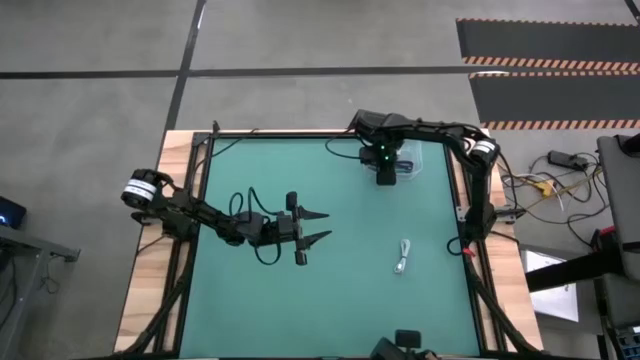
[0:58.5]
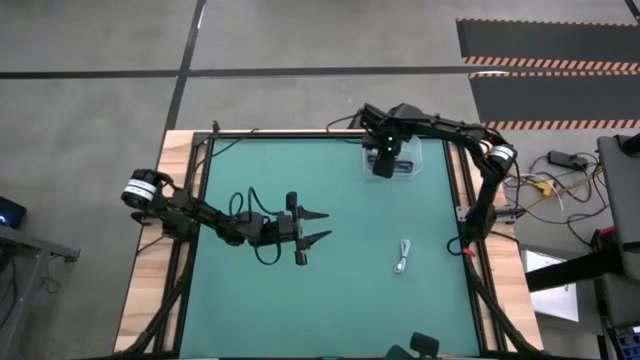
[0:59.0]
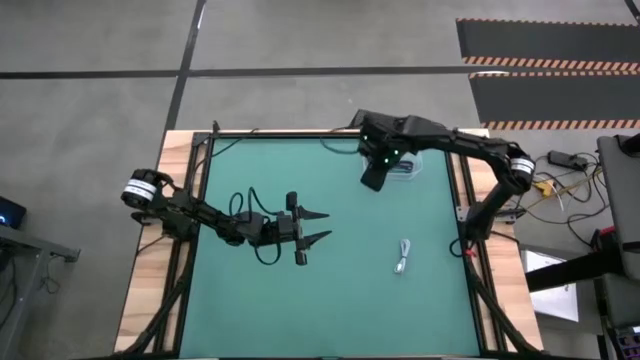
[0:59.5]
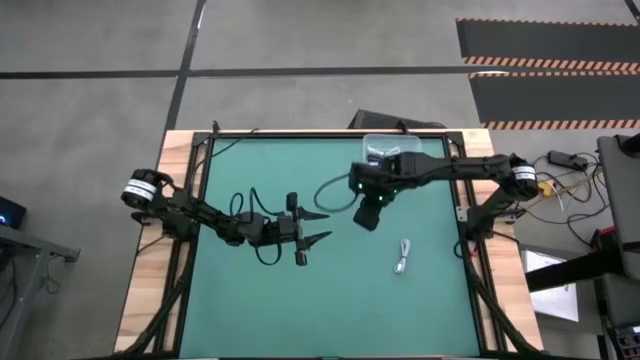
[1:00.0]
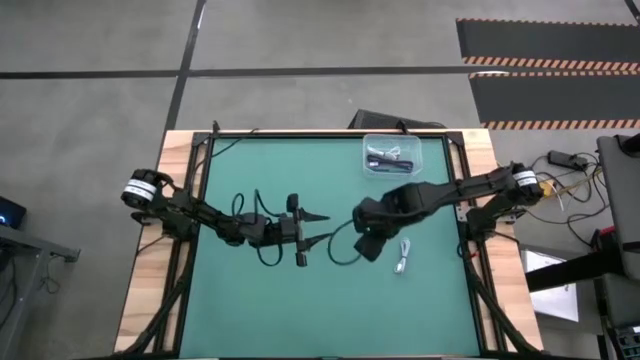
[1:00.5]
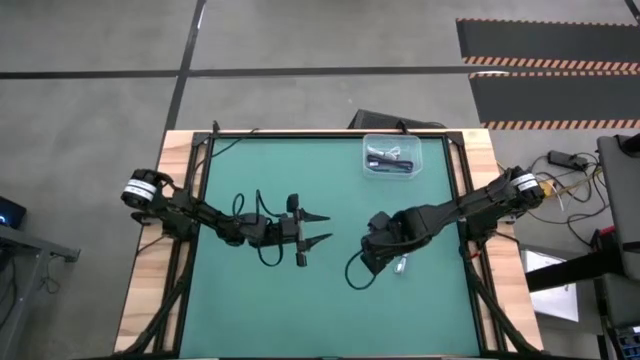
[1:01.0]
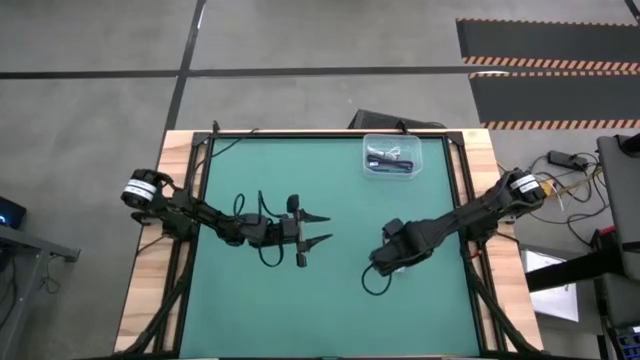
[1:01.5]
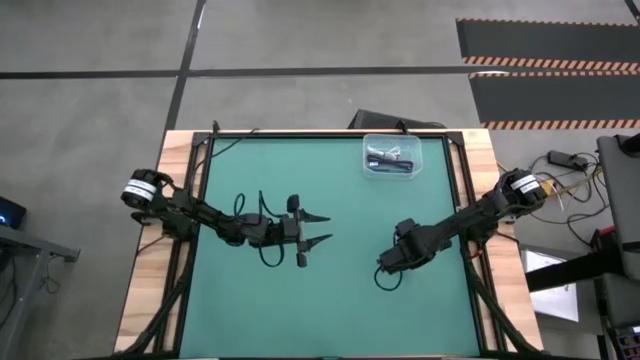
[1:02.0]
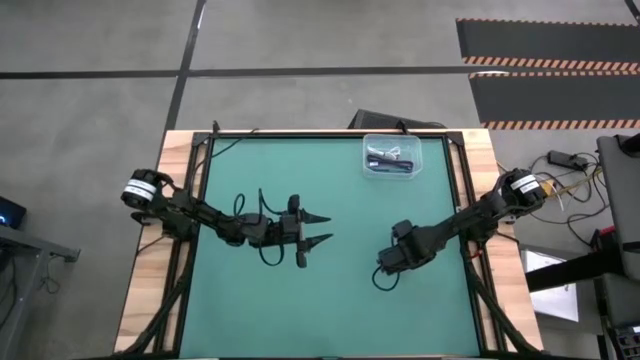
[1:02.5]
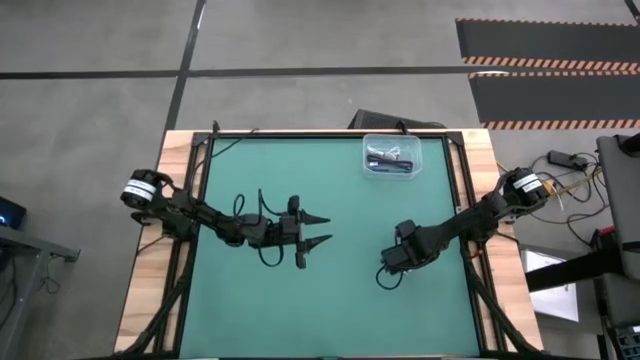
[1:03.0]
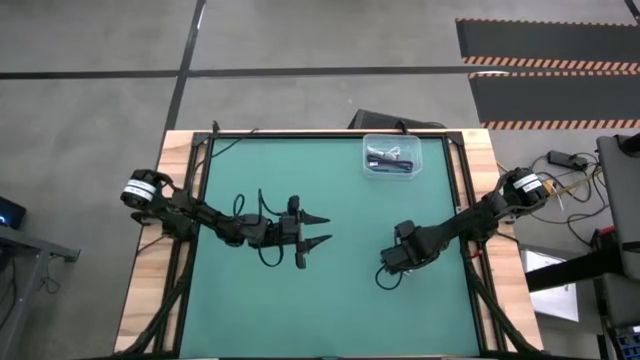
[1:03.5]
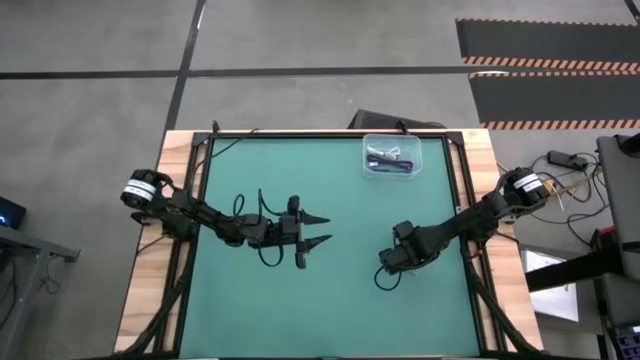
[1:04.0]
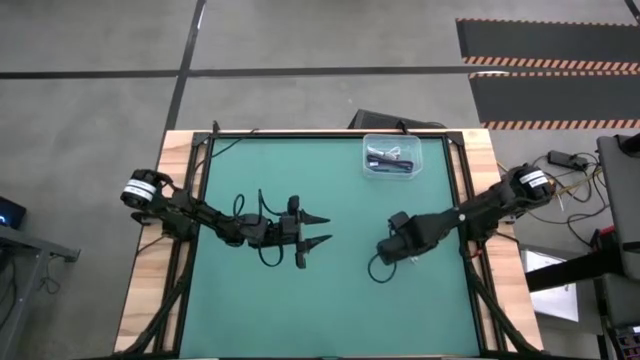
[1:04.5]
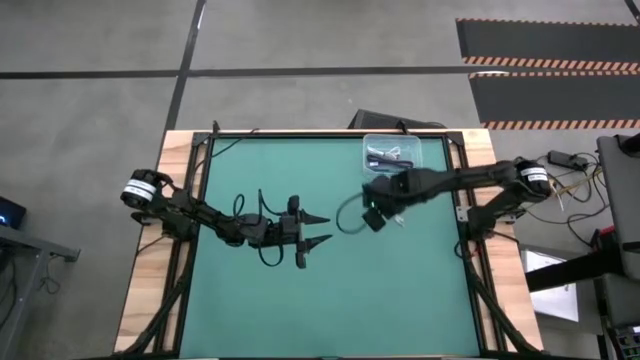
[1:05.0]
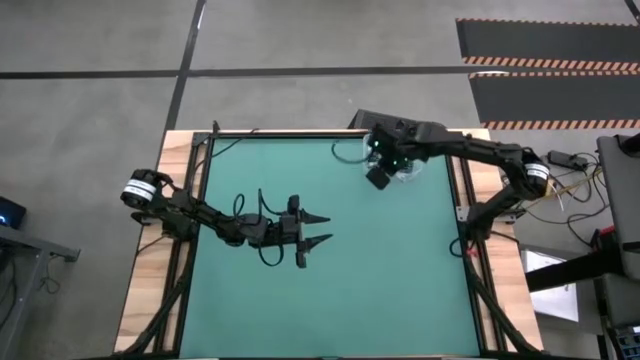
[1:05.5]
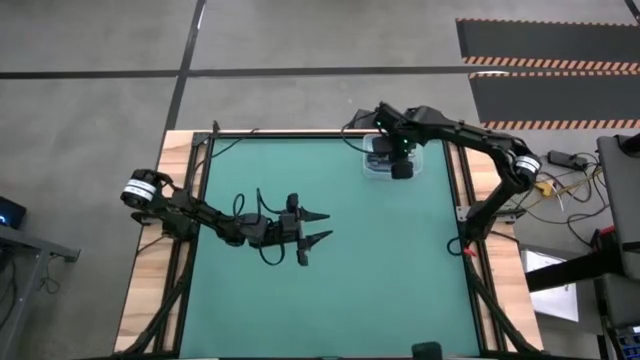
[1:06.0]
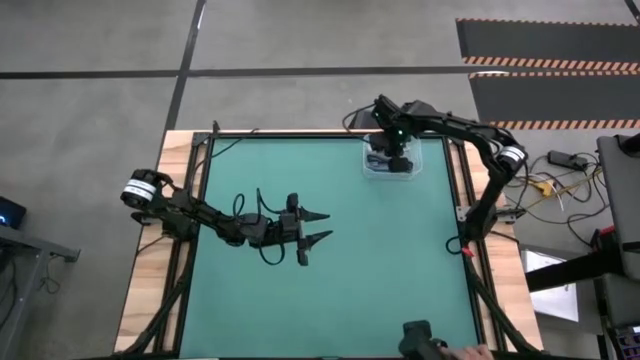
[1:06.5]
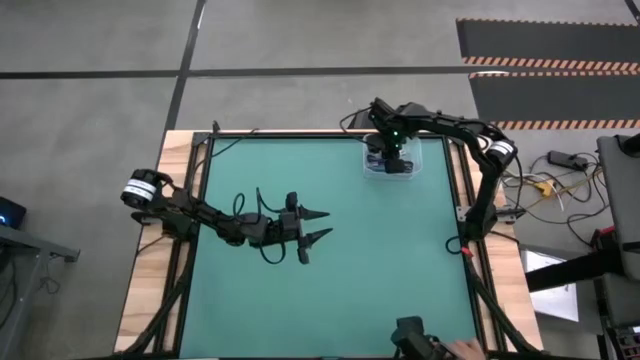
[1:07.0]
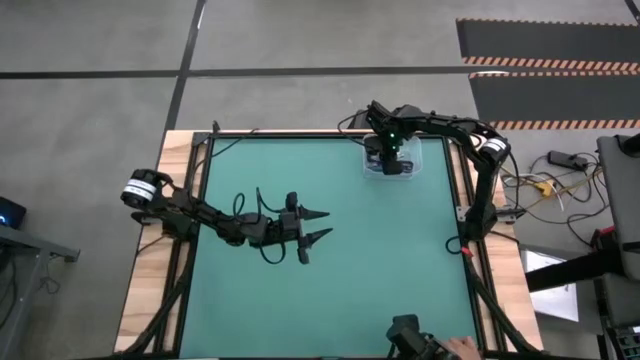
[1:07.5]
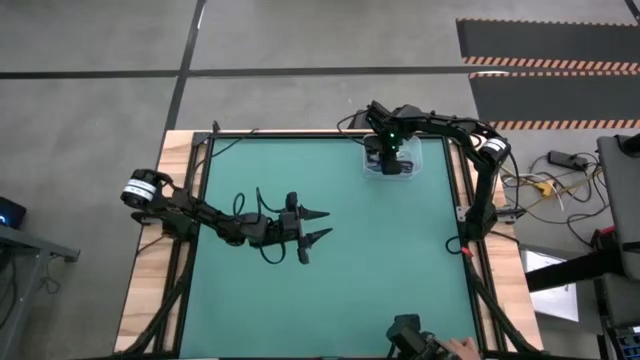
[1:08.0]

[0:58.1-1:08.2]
Task: Pick and place USB-C Cables
Put the light blue charger cable into the transparent bin

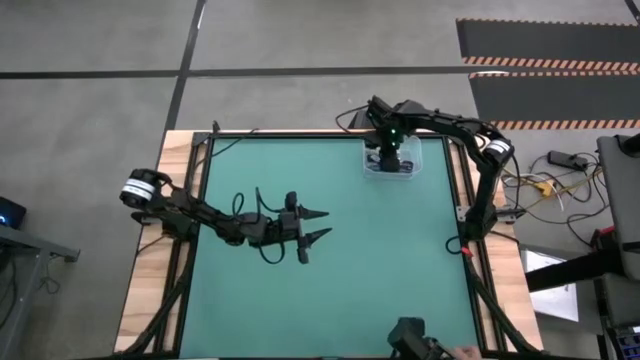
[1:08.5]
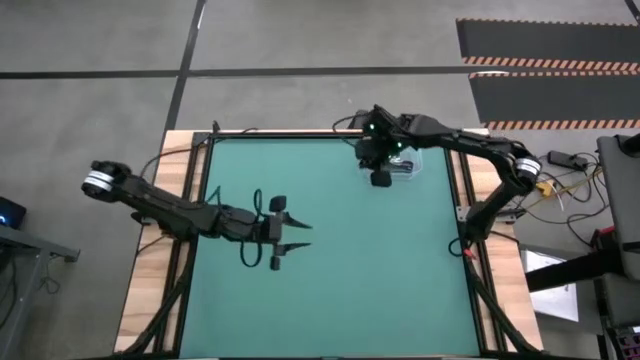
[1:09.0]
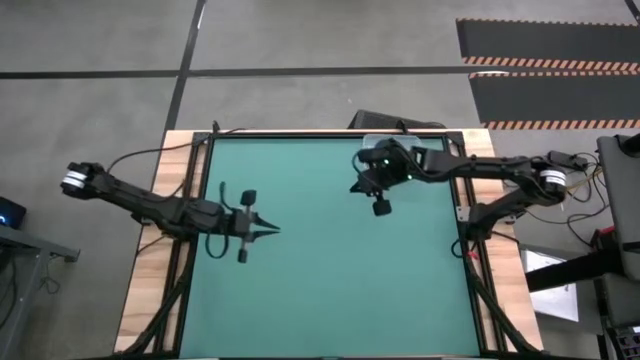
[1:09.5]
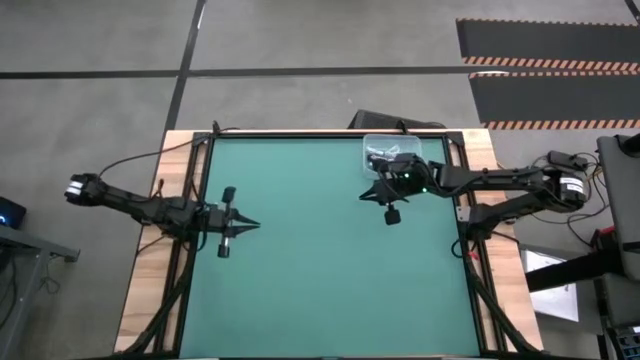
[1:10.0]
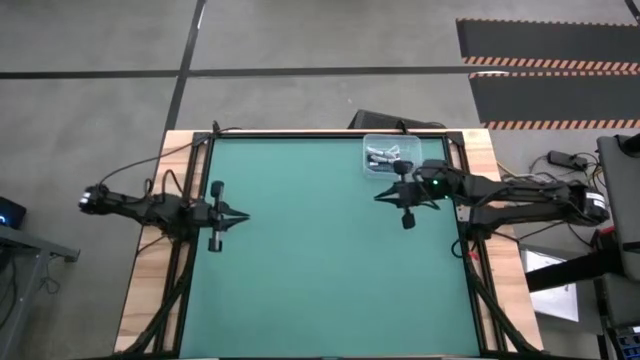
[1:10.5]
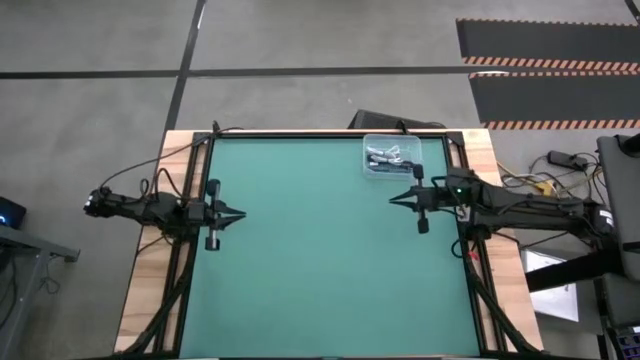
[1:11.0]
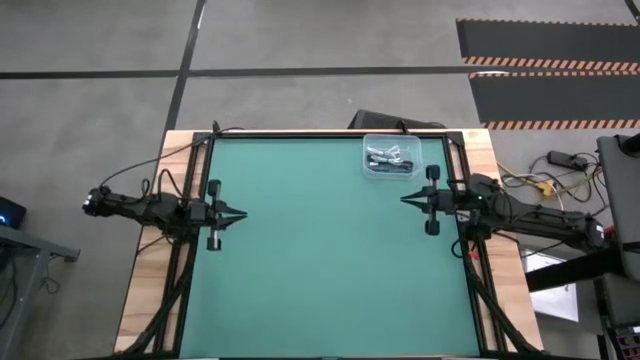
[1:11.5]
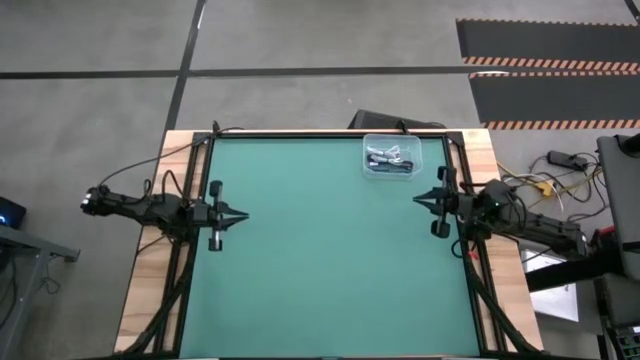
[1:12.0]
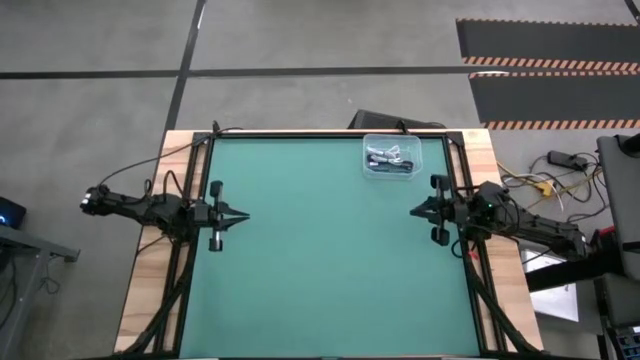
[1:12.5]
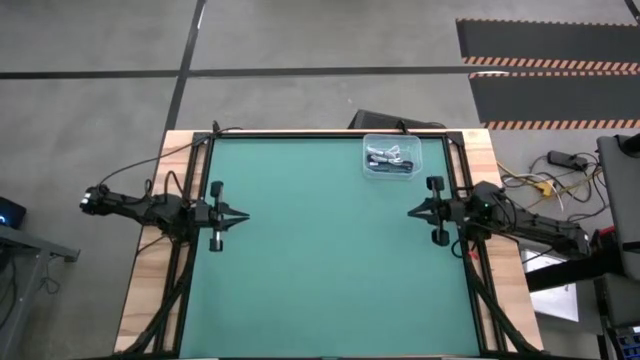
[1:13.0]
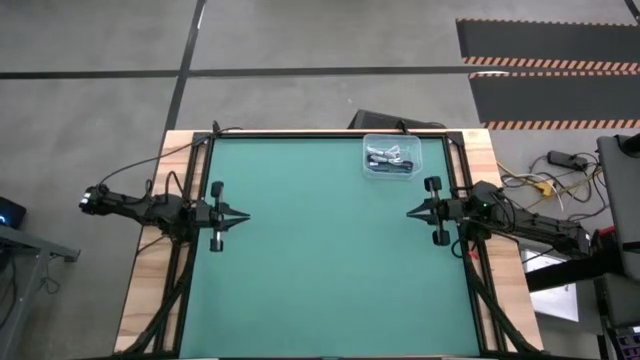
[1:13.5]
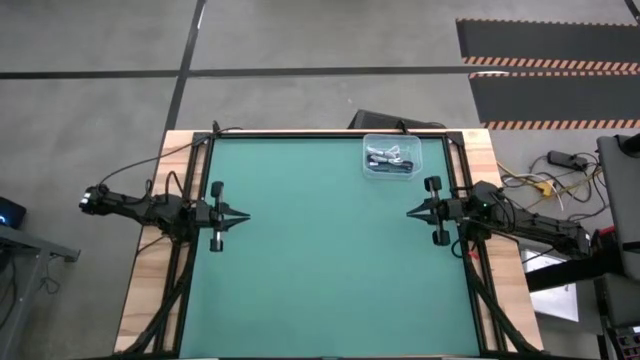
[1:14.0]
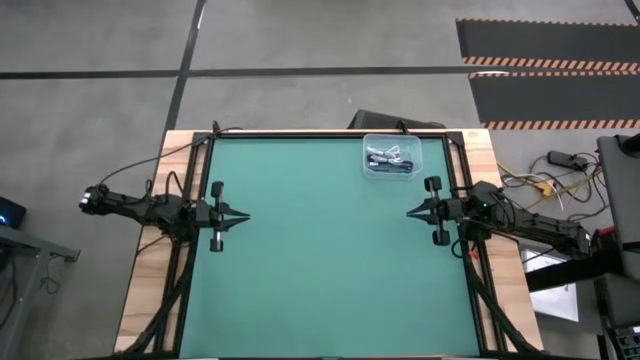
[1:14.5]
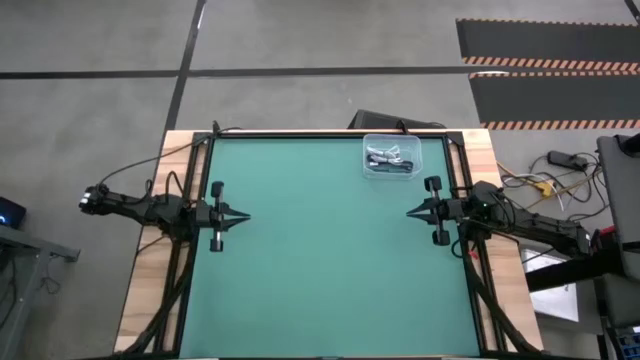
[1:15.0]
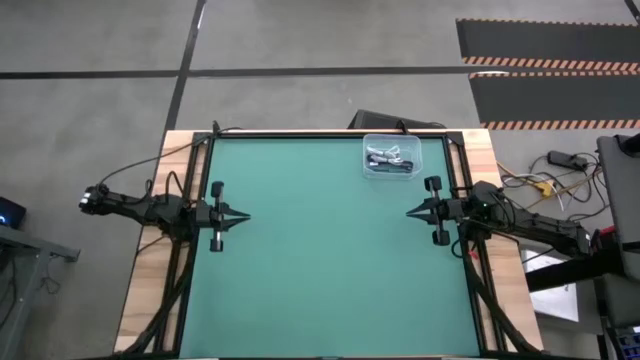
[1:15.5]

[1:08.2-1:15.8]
Return to Home Position

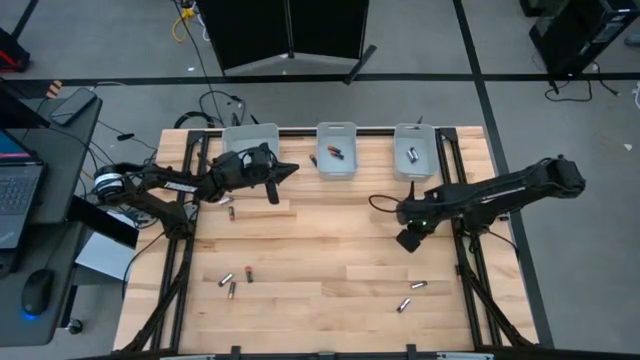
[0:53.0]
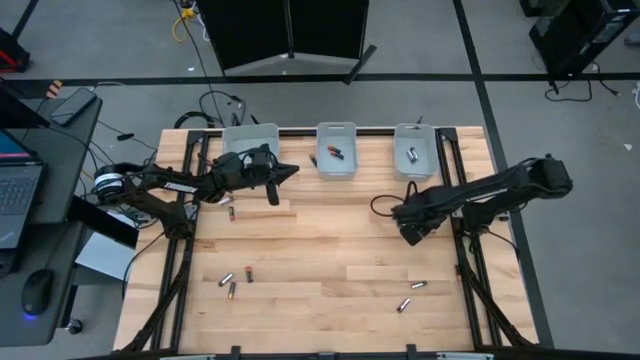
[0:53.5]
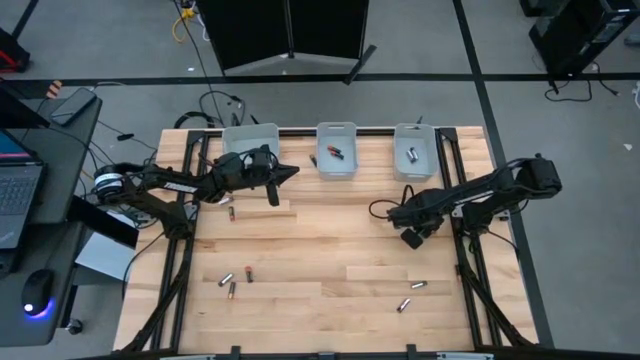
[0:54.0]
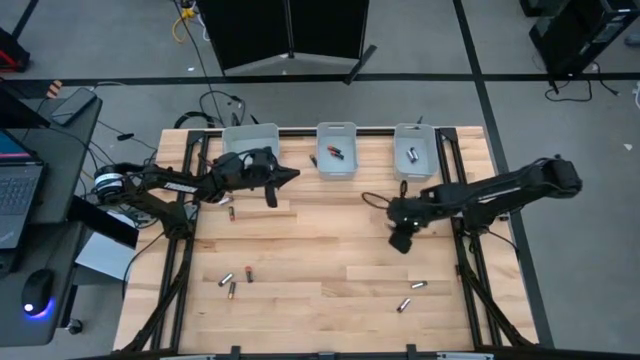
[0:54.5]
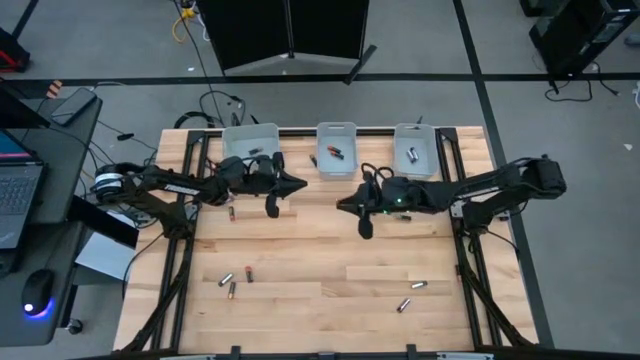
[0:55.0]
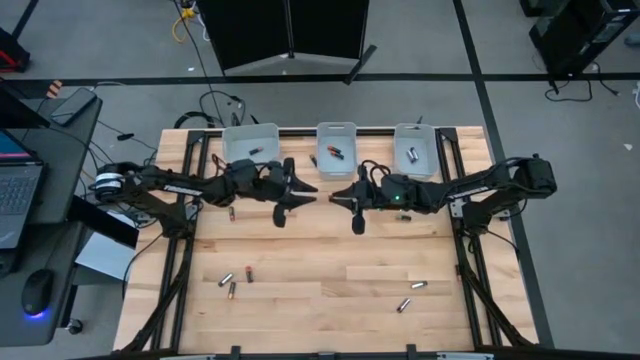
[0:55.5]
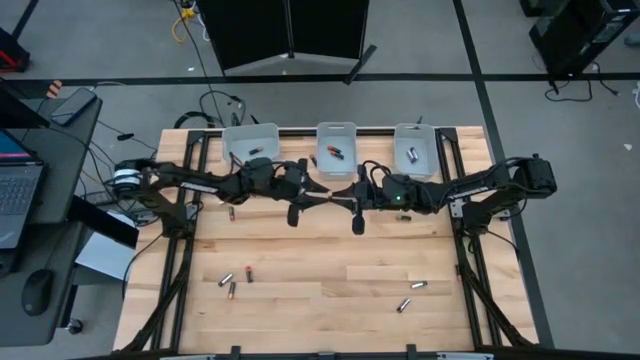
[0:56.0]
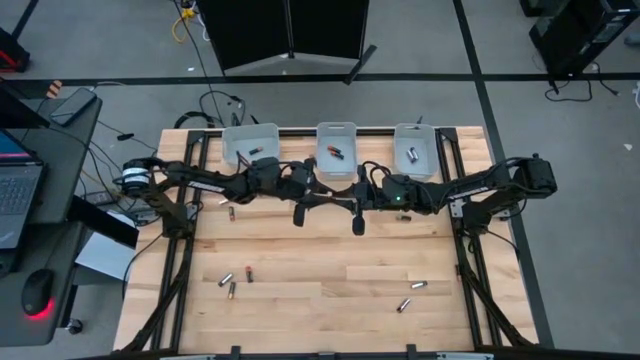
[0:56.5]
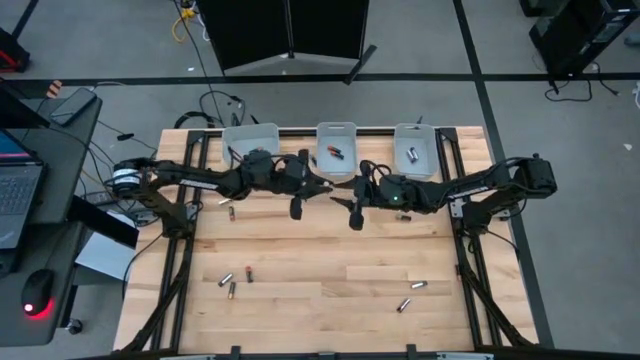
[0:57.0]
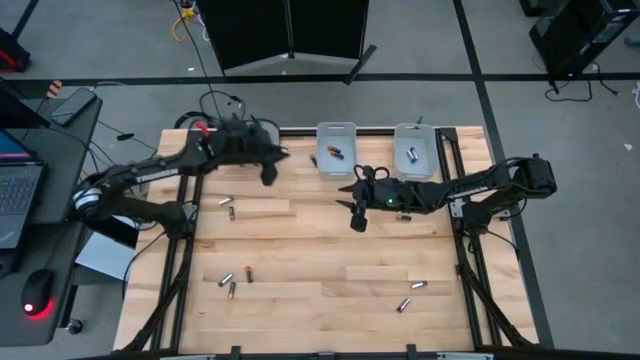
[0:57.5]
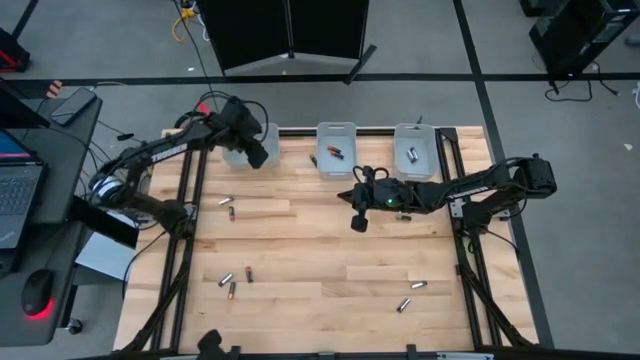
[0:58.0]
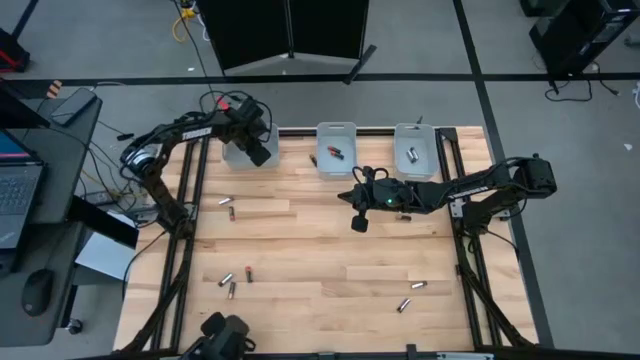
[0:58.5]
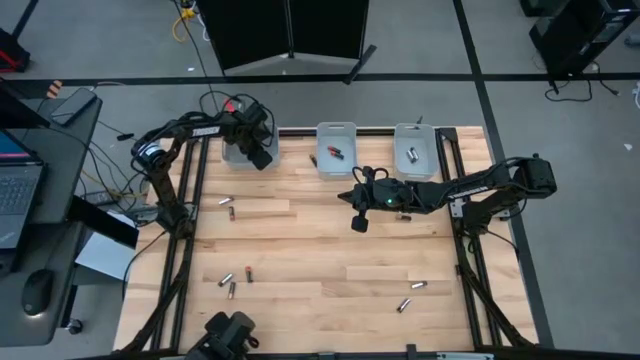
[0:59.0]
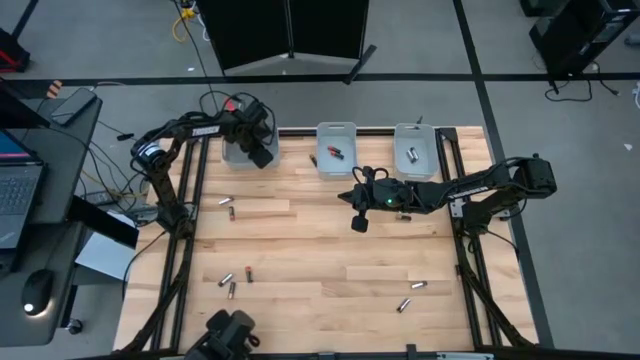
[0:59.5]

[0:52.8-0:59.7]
Task: Sort batteries
Put the black brown battery into the left bin
